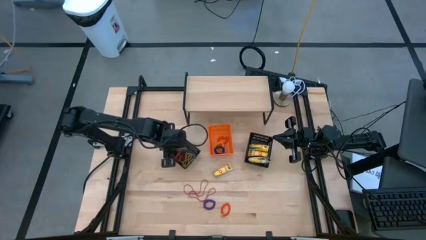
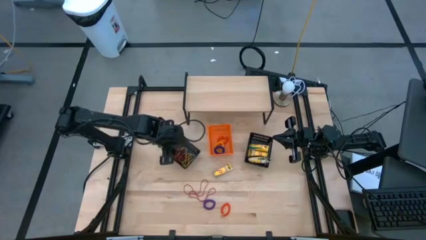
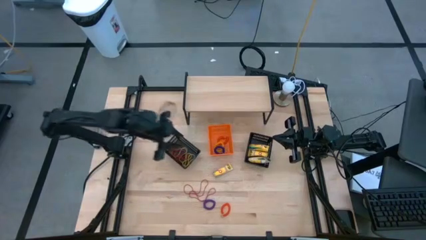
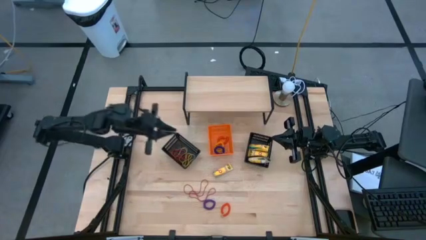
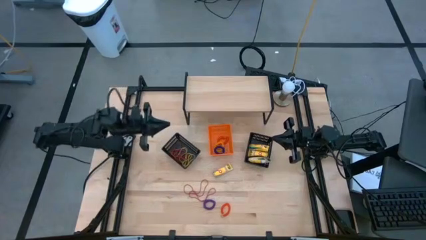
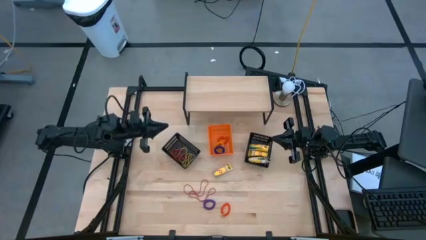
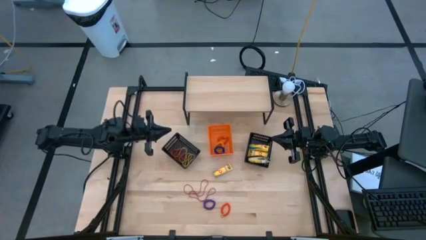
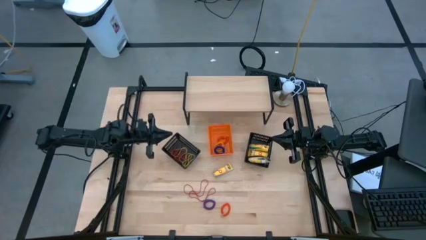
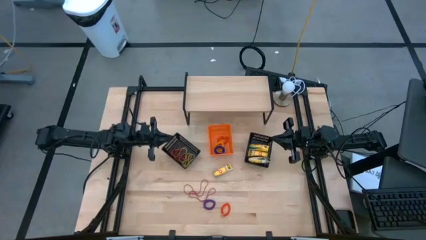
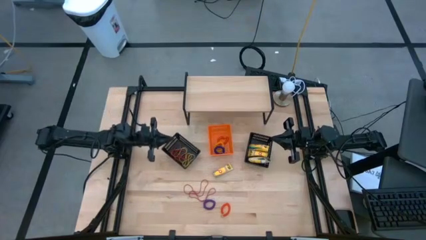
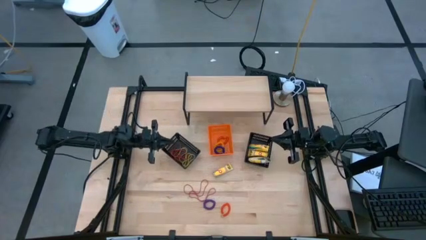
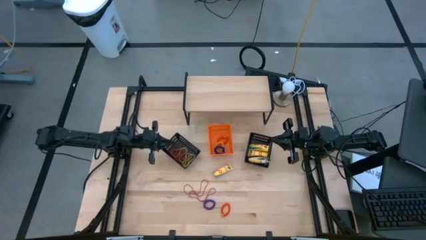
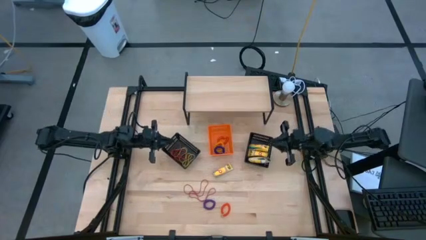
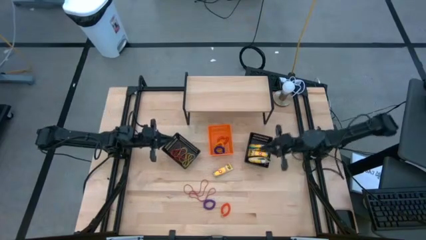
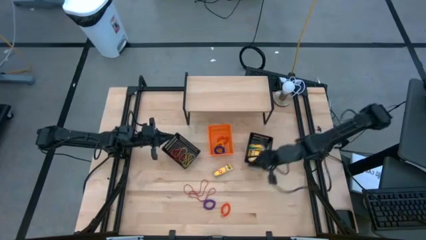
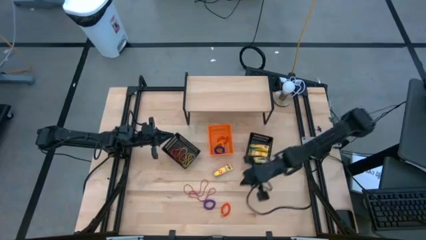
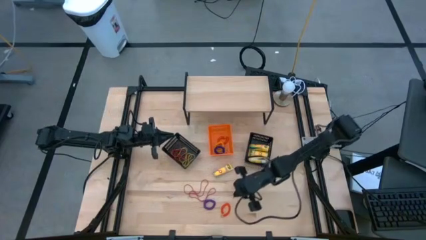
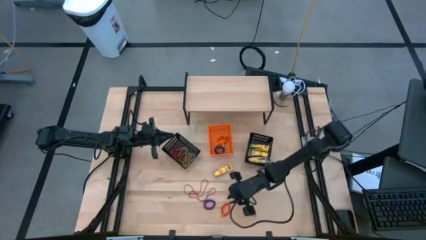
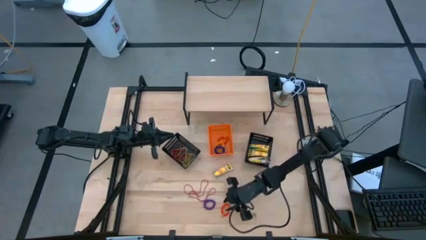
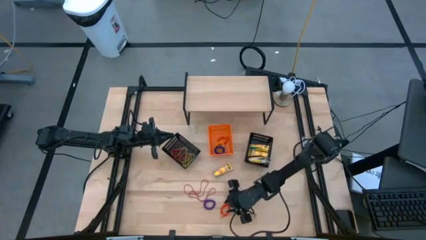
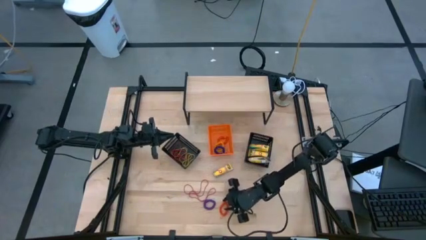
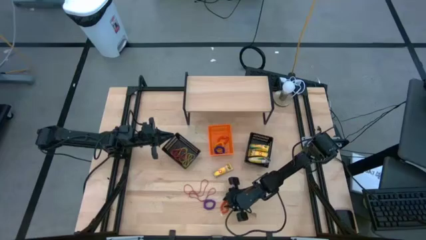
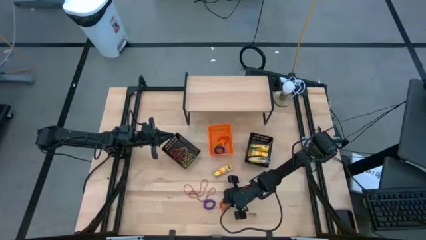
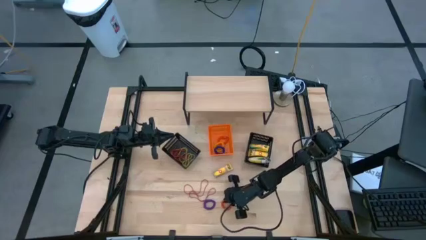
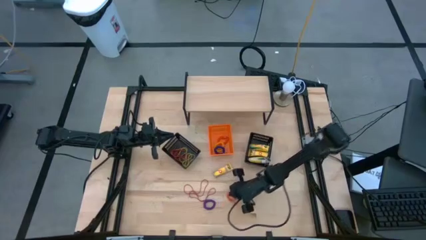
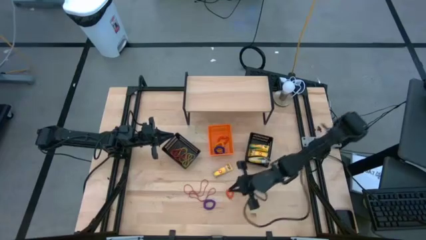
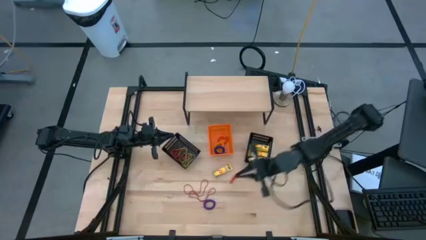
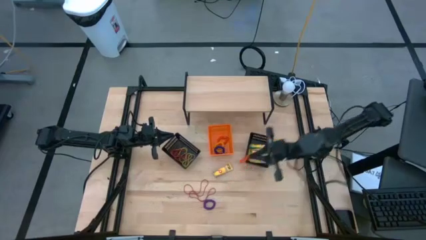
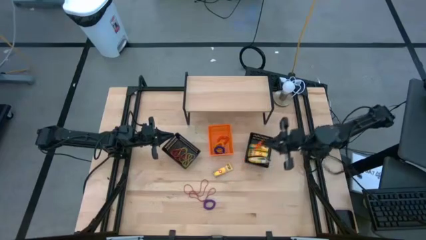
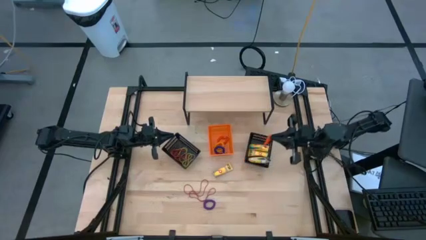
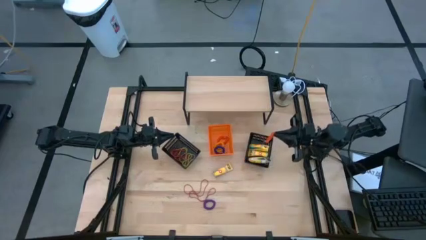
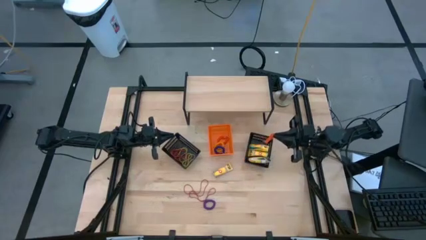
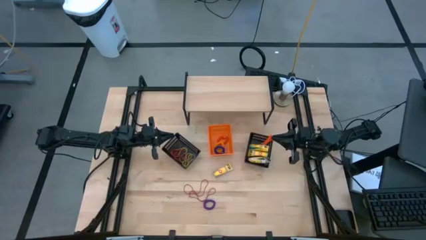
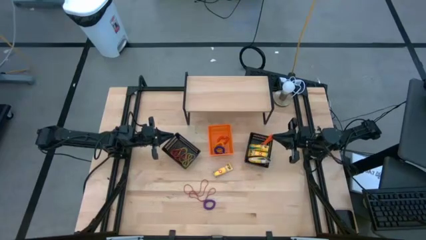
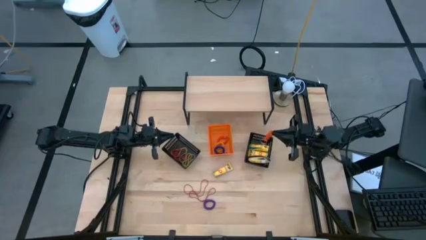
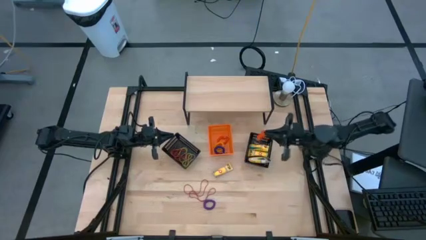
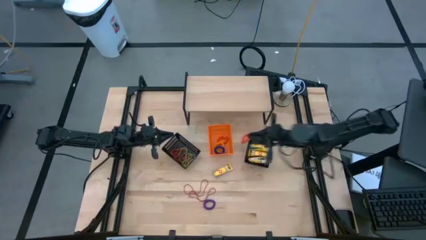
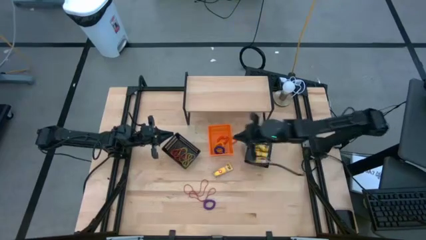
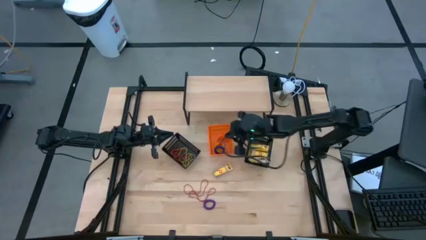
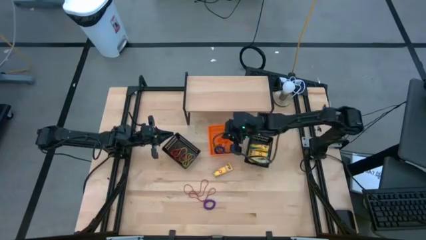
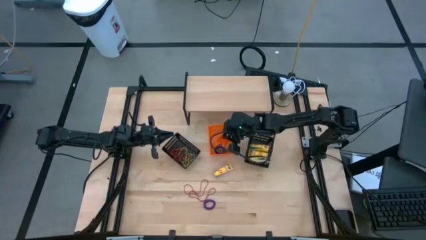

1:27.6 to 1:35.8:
Task: Pick & Place Office Desk Supplies
Put the orange spring keychain into the orange bin

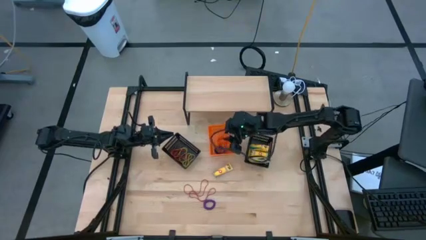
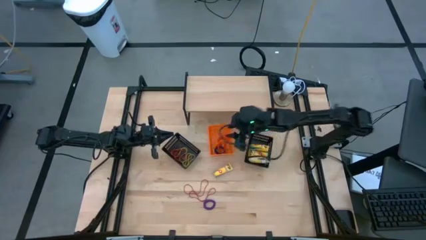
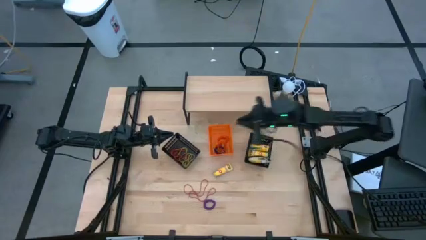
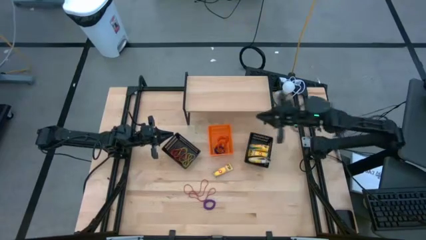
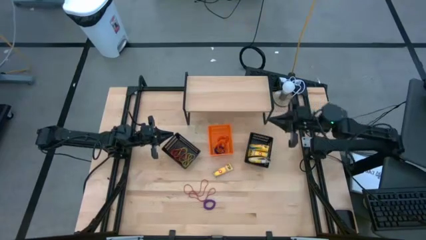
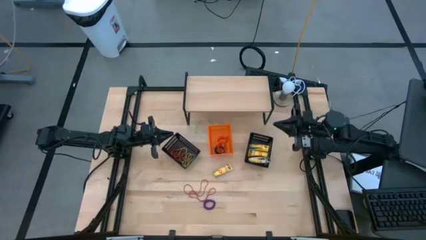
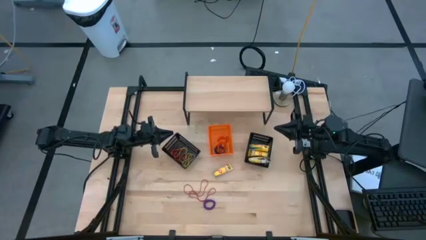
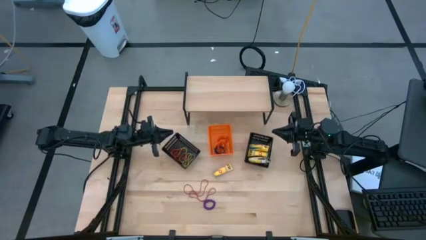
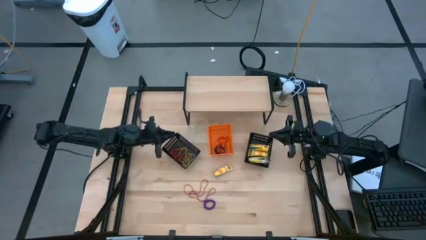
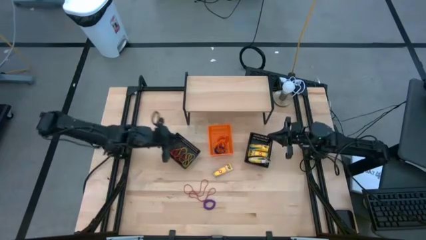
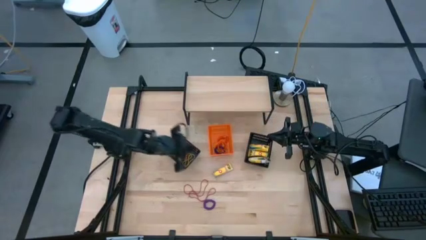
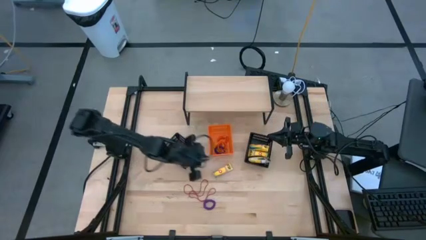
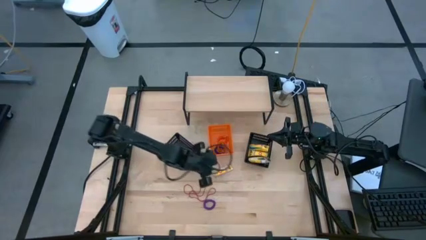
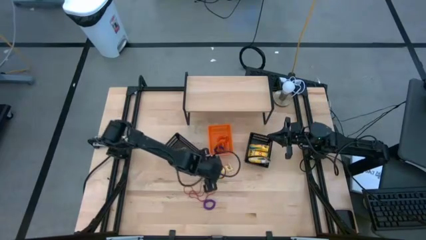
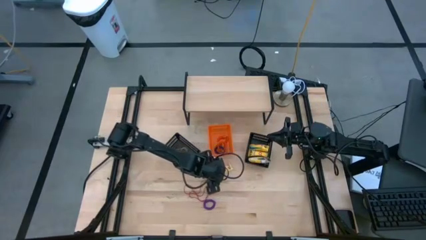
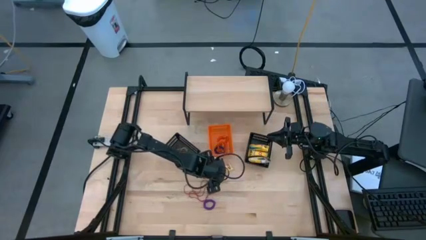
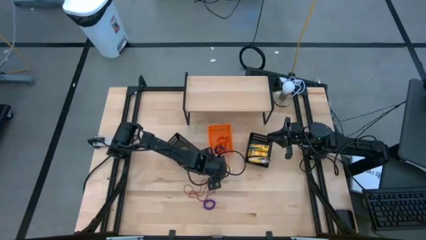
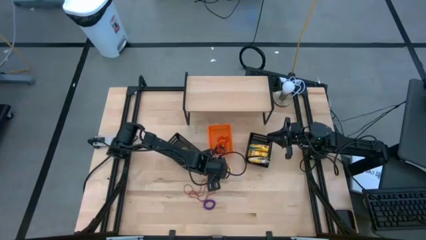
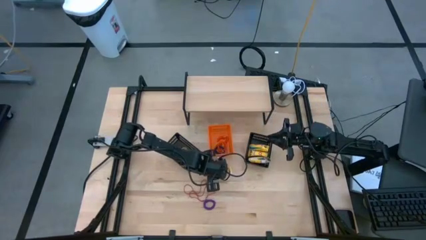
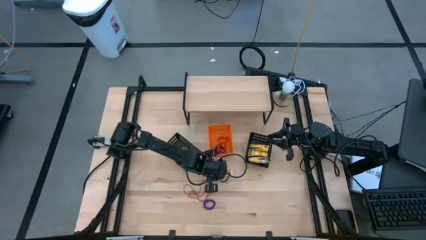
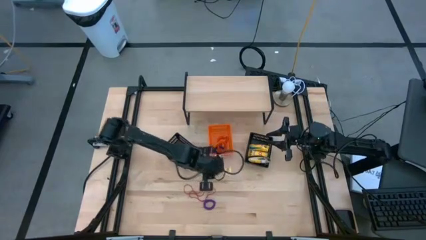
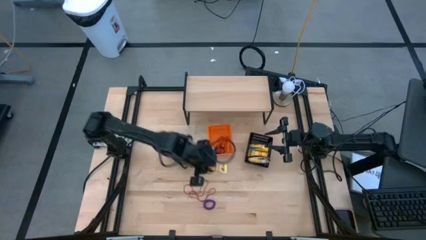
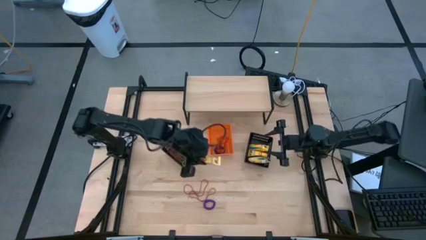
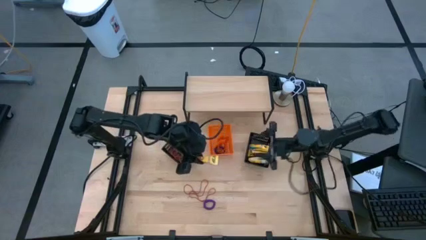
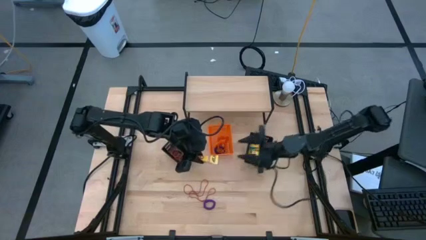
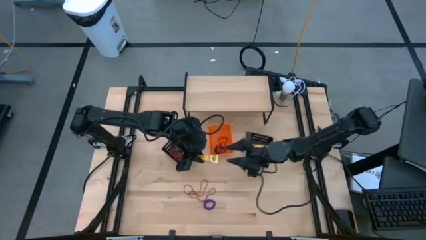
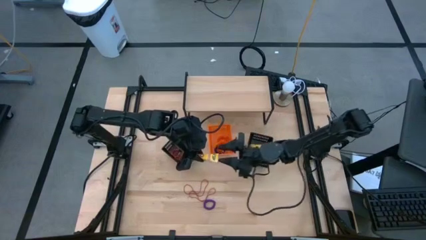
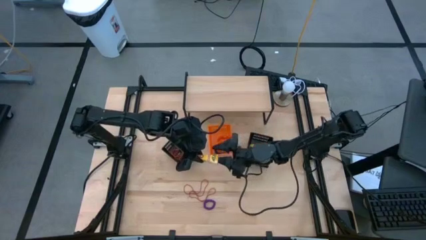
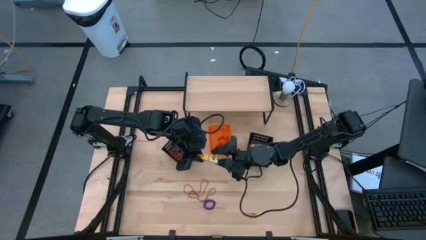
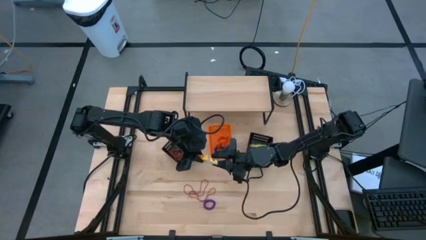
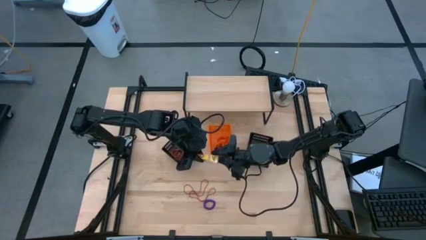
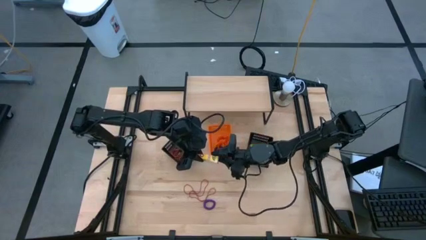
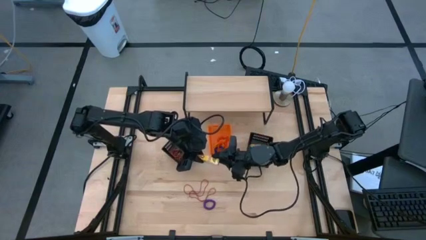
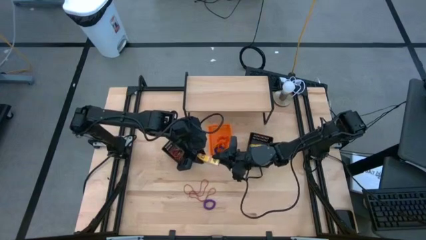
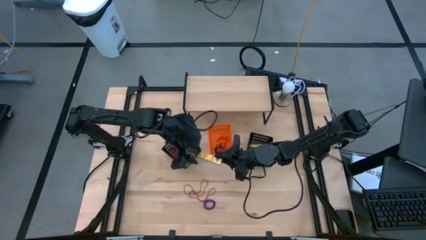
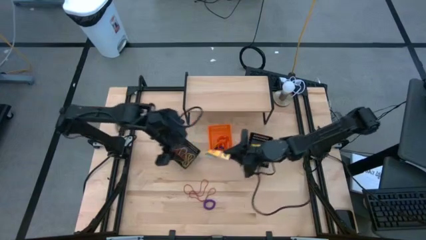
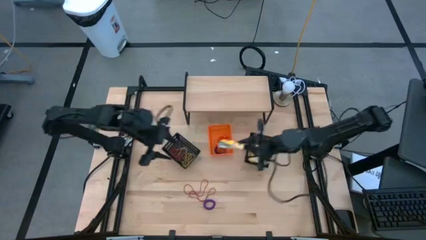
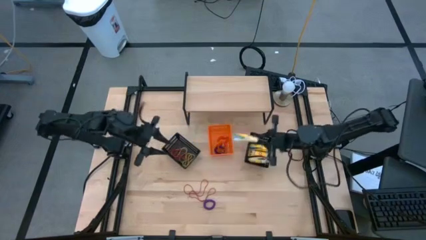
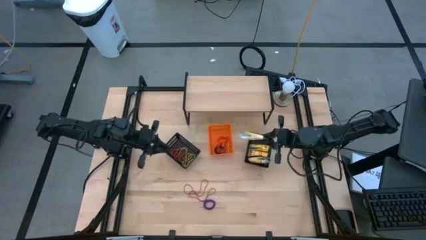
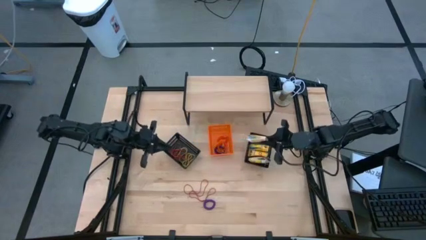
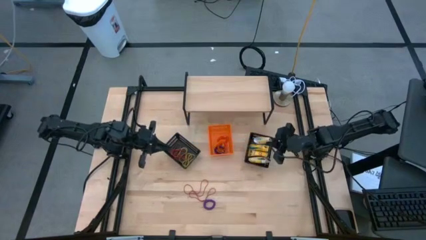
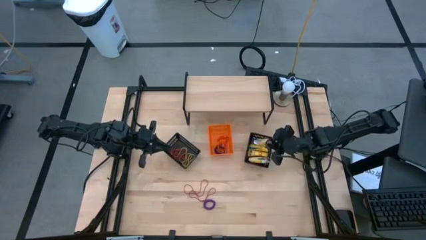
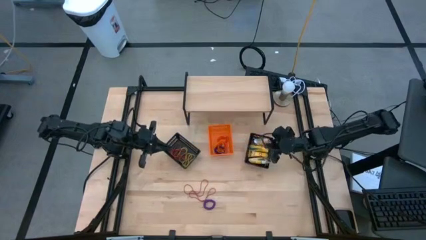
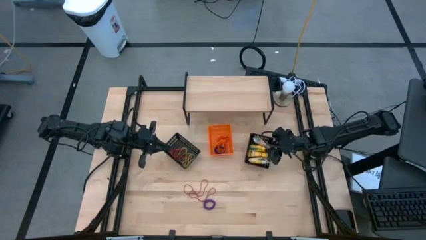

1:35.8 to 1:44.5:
Put the yellow pack of crayons into the right black bin
